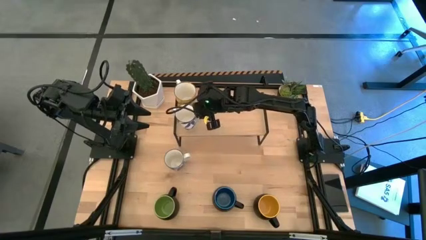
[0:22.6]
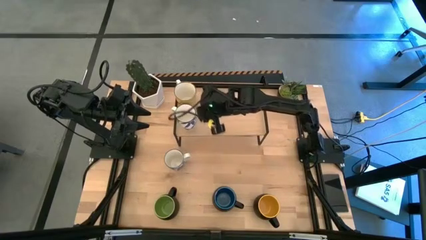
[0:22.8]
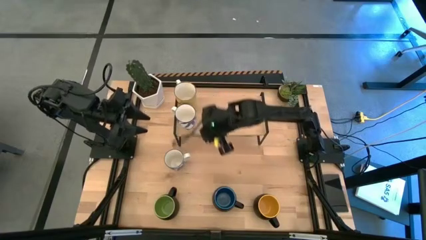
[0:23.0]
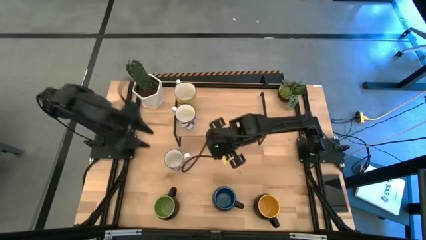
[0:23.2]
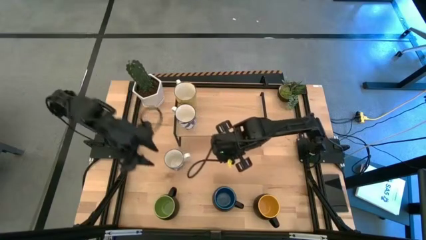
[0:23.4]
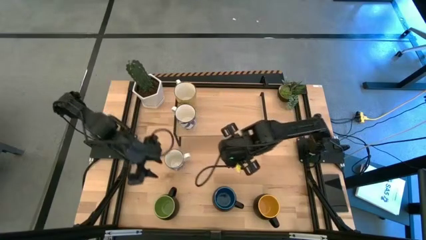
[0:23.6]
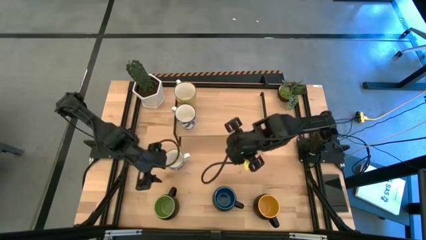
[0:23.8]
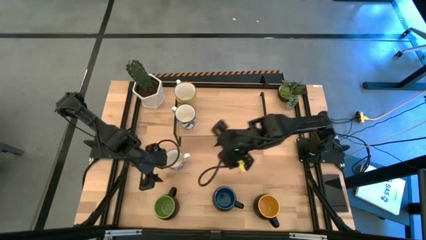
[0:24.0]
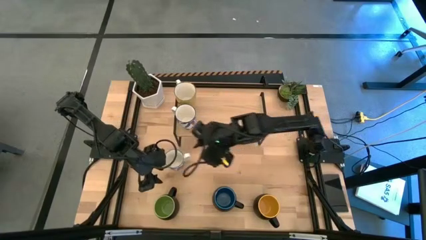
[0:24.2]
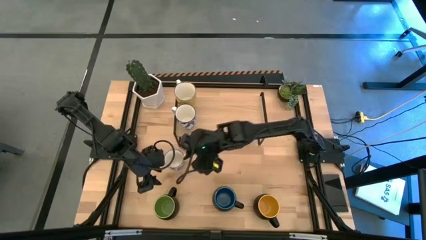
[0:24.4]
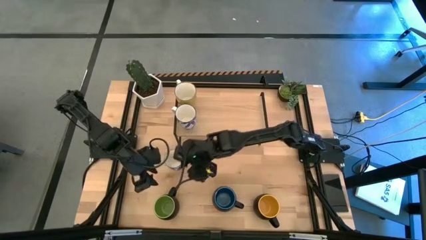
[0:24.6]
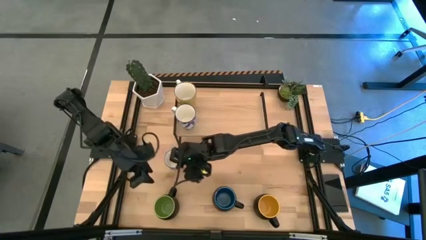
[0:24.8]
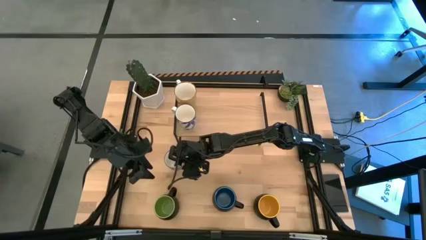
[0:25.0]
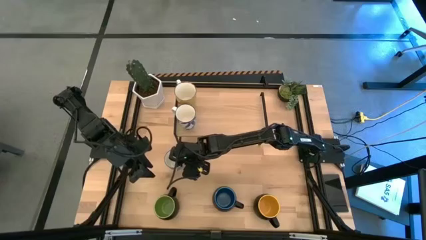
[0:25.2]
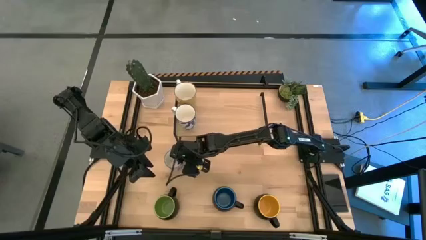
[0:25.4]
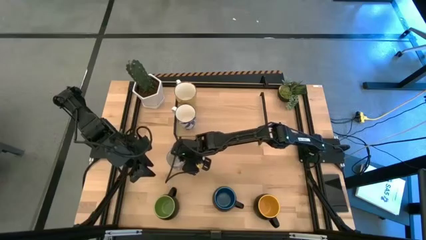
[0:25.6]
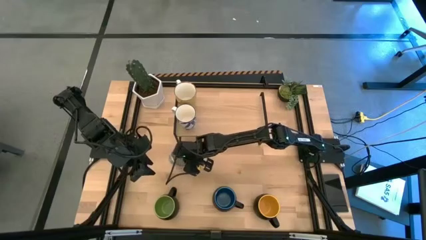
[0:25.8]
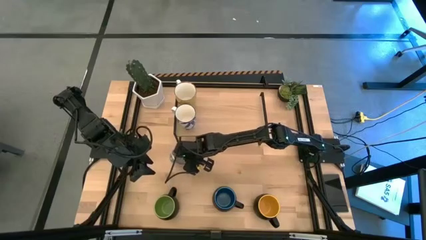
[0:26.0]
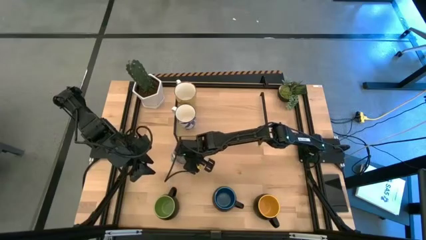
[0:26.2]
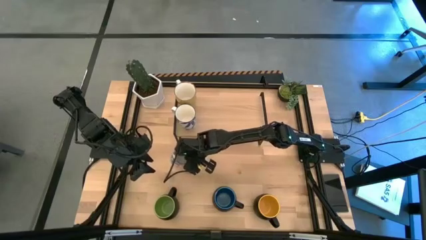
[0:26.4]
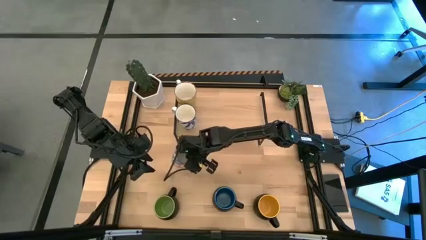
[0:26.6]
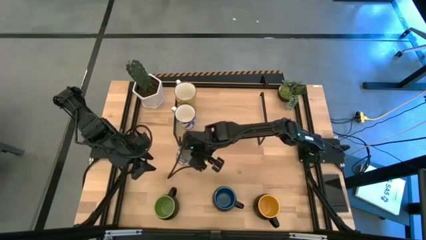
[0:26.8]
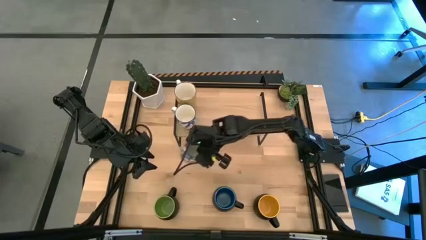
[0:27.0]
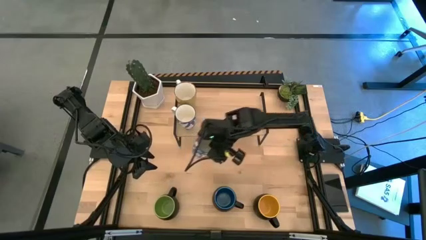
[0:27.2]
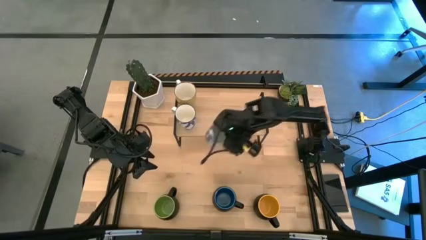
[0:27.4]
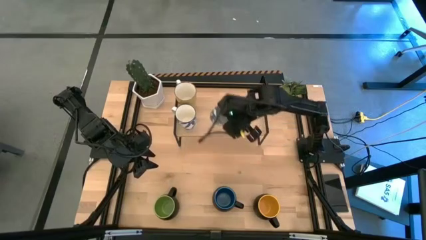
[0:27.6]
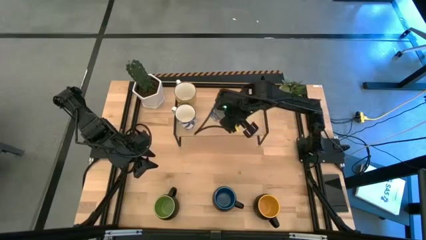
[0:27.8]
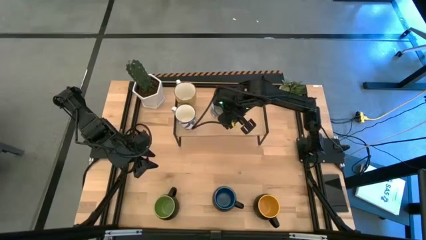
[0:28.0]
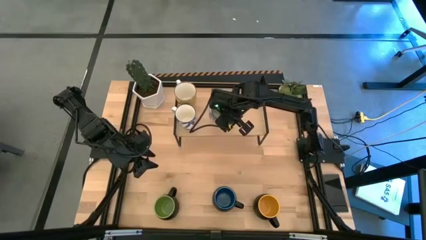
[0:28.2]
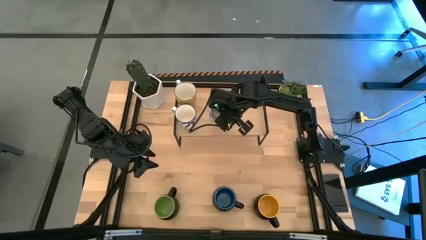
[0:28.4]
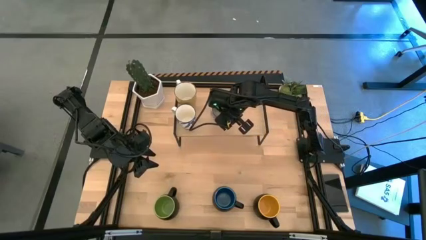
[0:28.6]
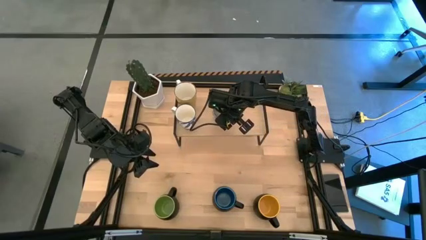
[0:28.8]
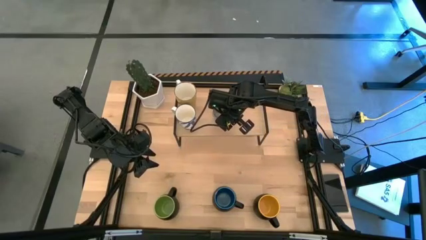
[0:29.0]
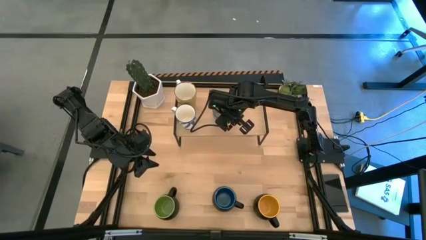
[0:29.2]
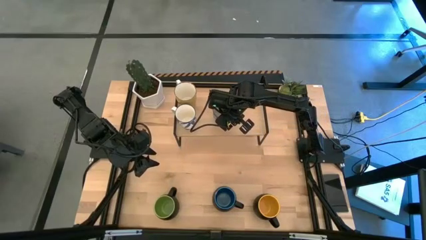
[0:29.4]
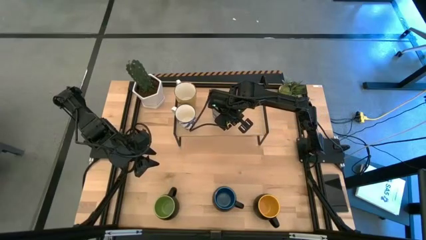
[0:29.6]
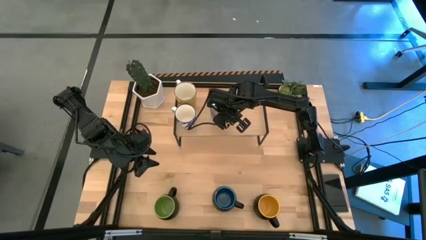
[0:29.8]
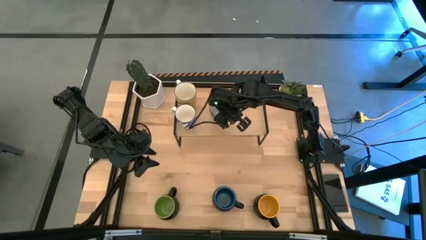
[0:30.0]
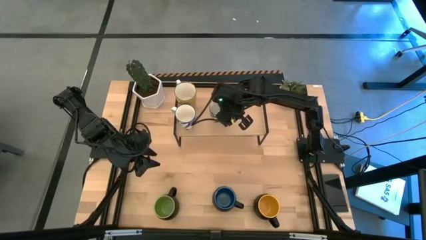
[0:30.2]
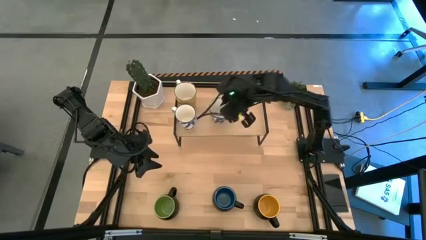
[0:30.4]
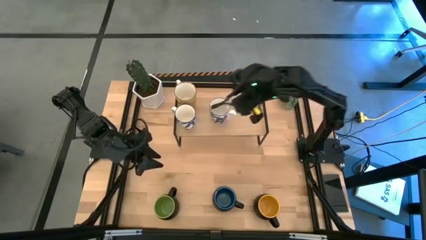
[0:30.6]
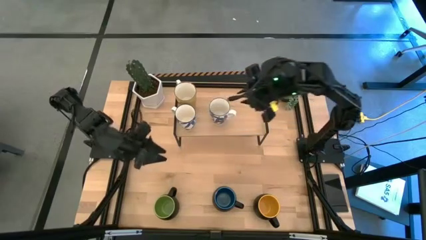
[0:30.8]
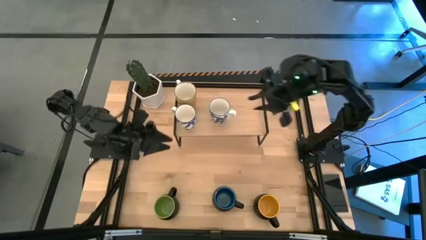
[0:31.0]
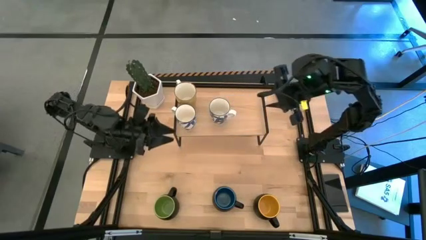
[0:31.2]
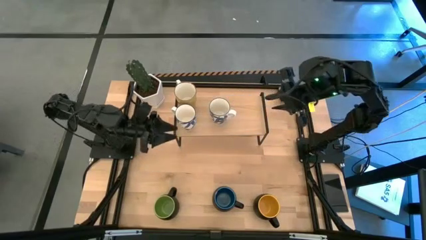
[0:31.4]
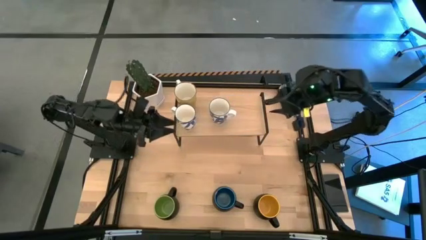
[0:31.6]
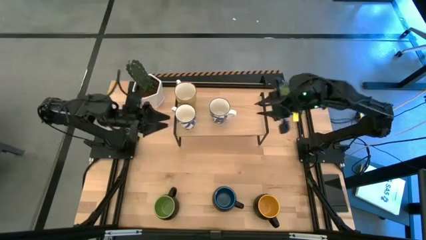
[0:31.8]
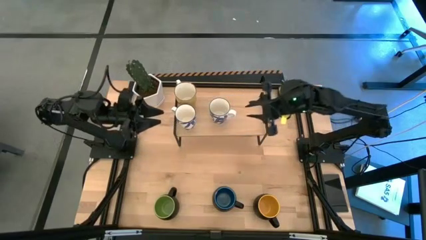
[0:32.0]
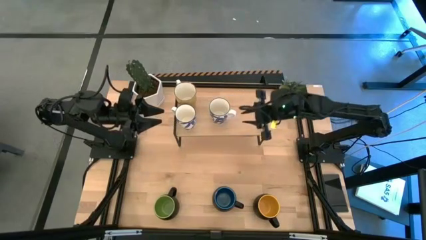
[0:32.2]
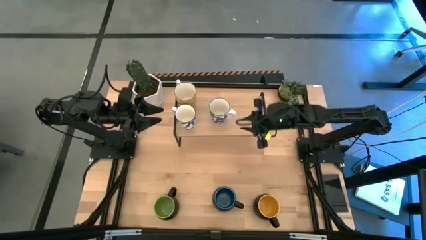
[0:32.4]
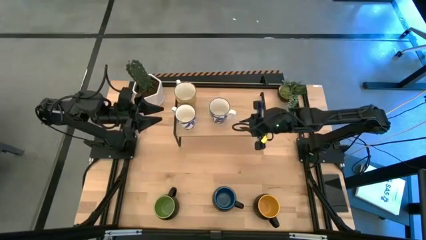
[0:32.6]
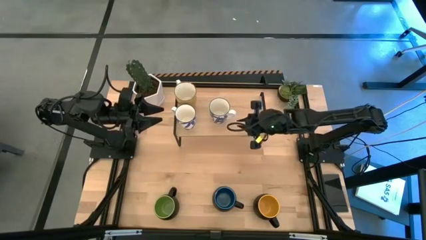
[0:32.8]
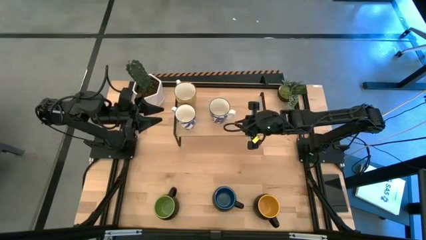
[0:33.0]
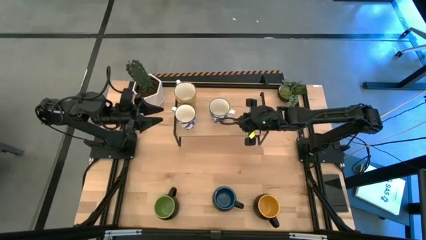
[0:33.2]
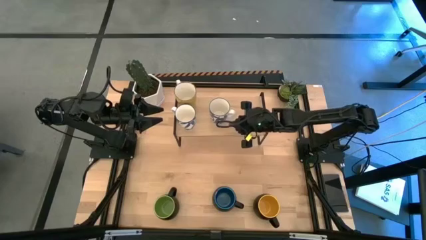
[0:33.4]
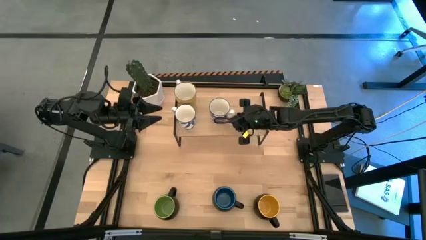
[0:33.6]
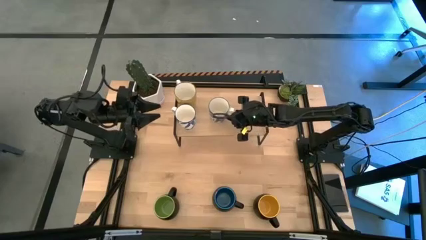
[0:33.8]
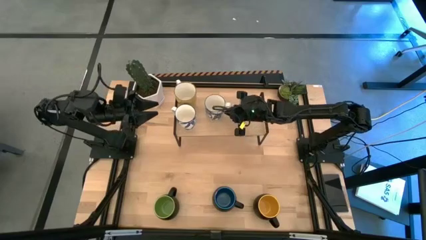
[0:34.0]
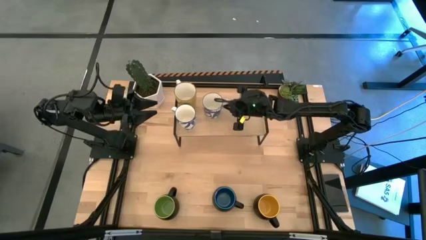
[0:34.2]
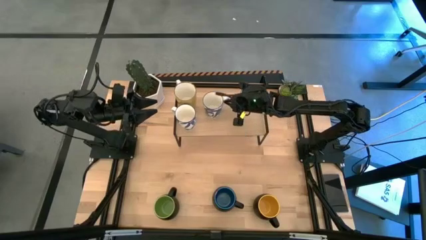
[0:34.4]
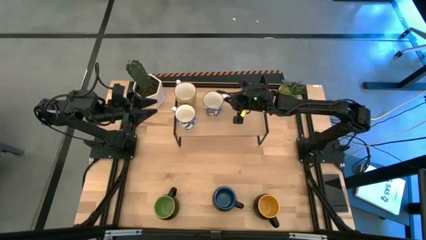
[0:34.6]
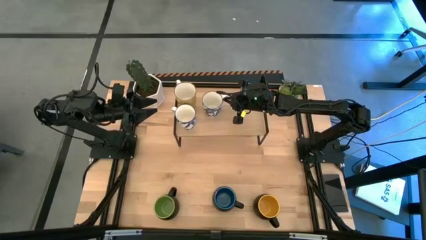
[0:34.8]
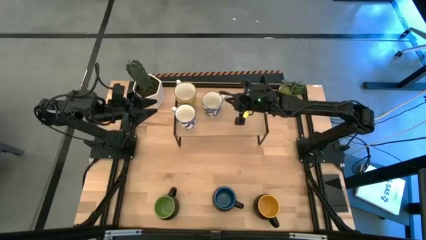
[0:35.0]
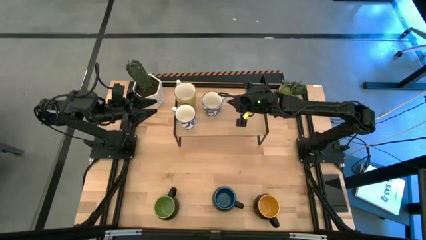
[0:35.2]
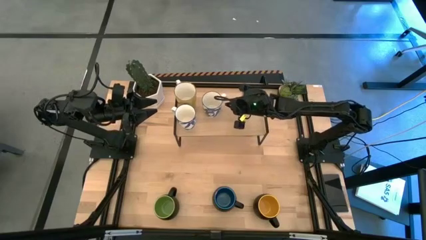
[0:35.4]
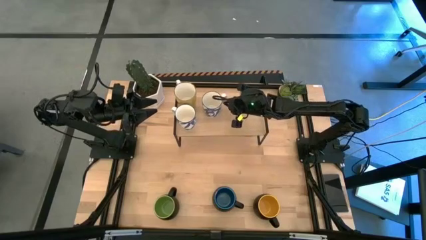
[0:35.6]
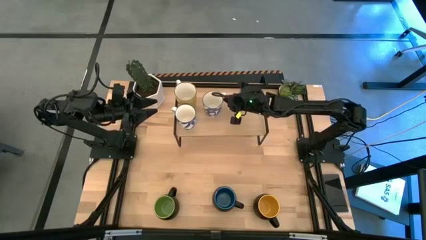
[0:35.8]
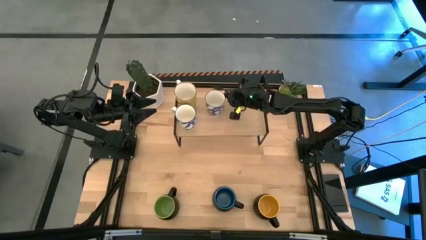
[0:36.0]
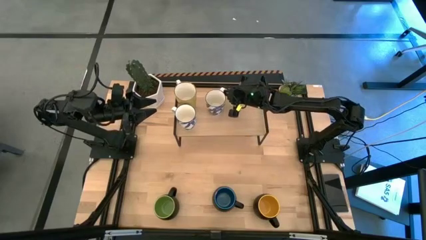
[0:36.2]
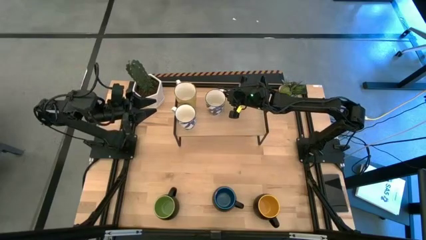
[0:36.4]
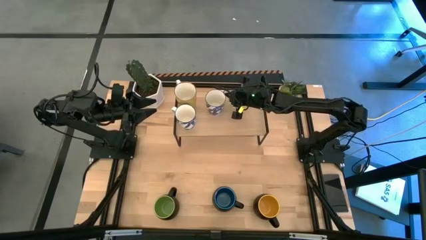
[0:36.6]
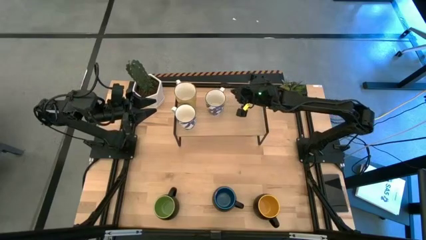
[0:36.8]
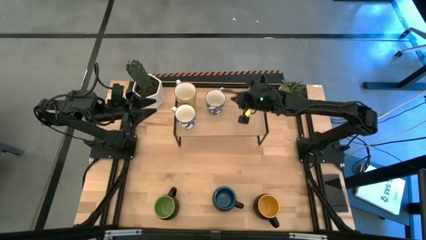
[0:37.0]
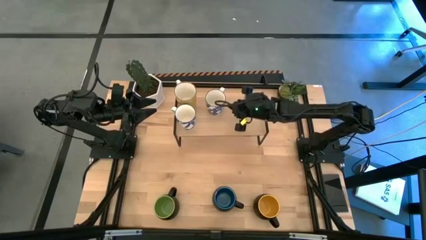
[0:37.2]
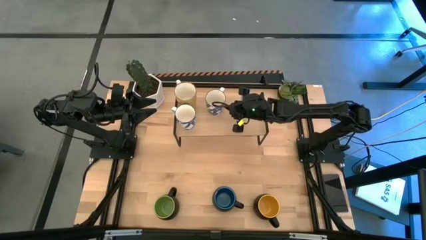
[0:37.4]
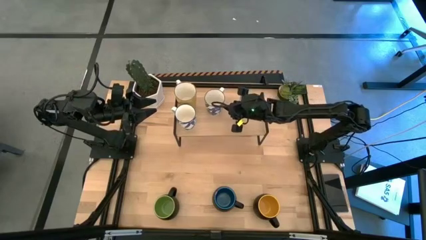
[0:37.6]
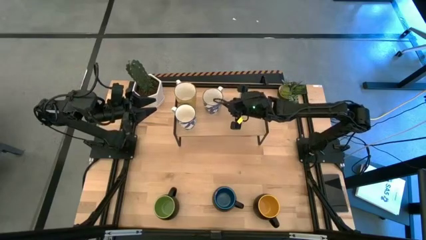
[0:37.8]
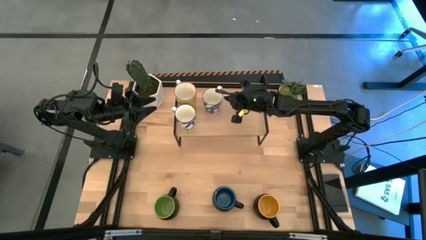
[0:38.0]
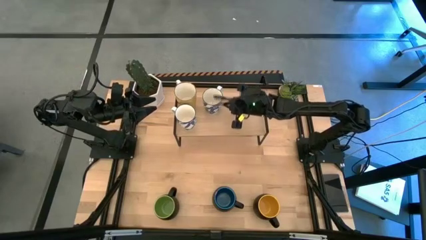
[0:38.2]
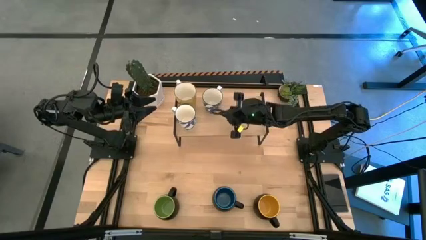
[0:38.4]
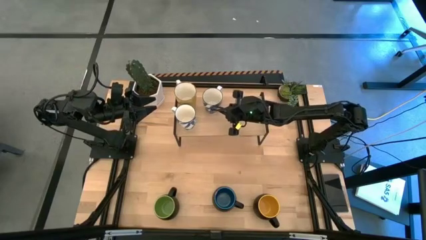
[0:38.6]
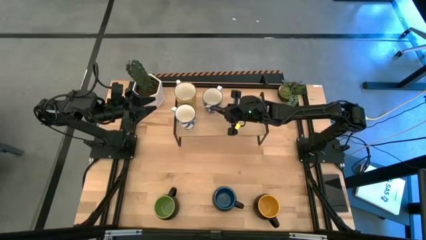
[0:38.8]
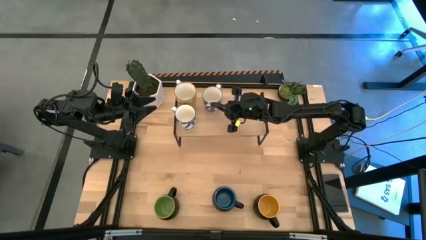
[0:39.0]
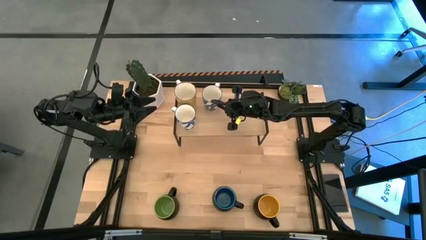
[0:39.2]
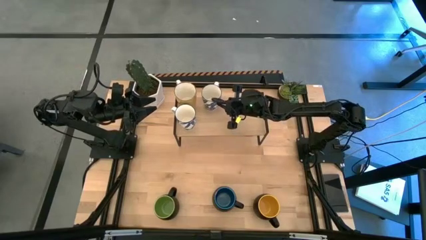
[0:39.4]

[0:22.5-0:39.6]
Task: Place coffee mugs
Put the white and blue patterned cup on the shelf
